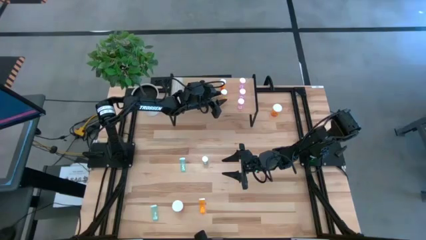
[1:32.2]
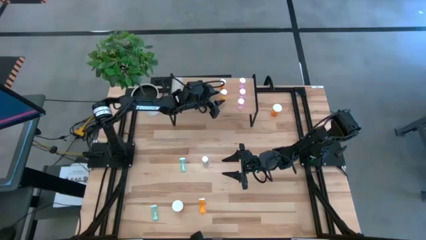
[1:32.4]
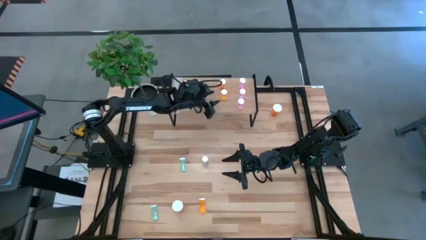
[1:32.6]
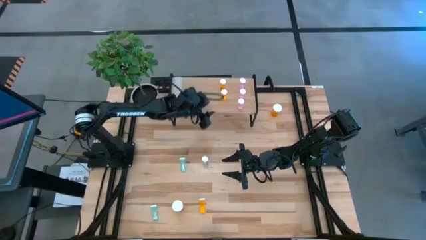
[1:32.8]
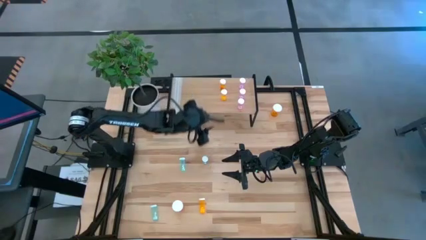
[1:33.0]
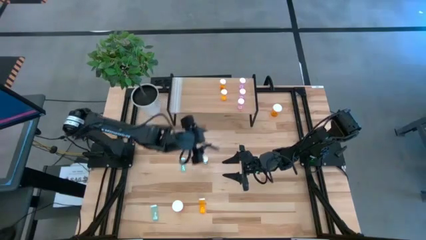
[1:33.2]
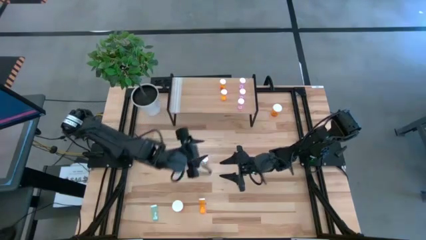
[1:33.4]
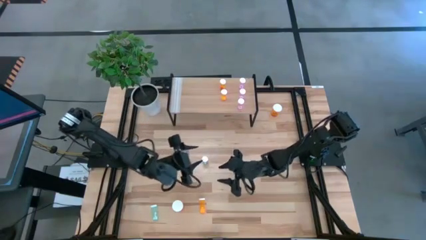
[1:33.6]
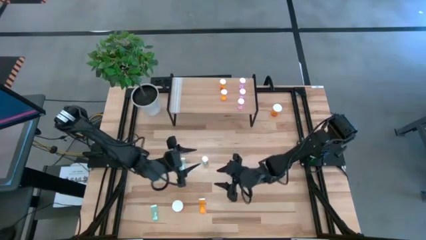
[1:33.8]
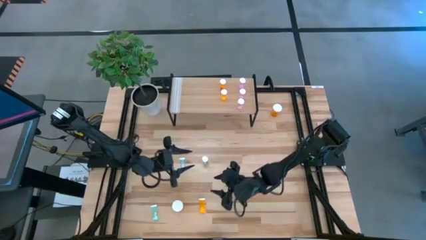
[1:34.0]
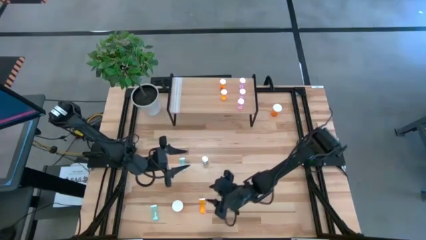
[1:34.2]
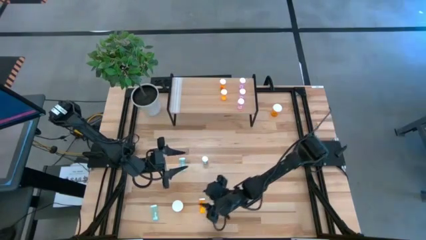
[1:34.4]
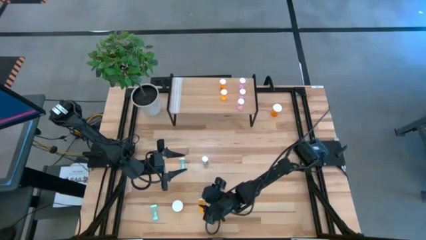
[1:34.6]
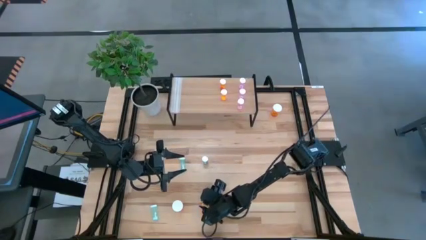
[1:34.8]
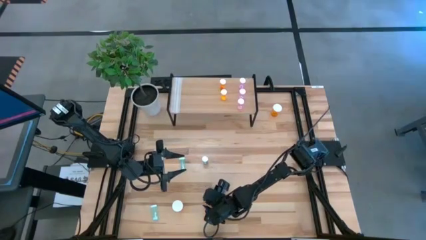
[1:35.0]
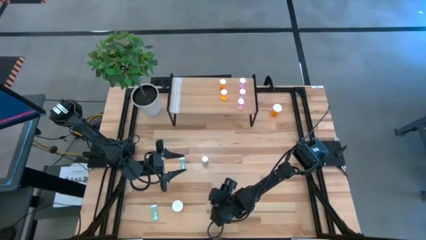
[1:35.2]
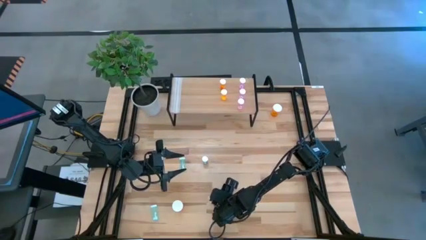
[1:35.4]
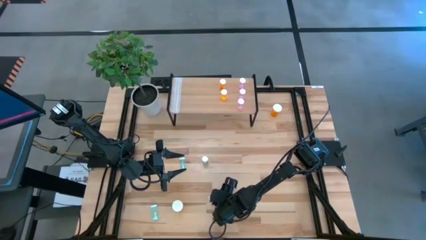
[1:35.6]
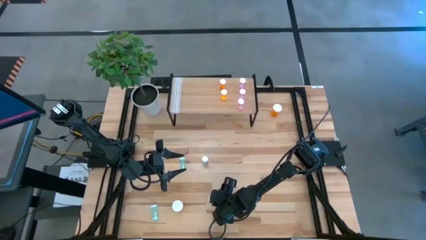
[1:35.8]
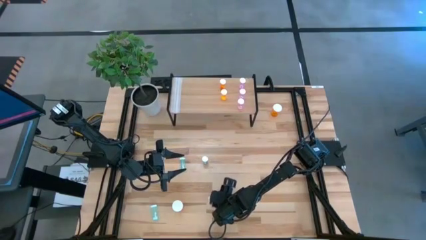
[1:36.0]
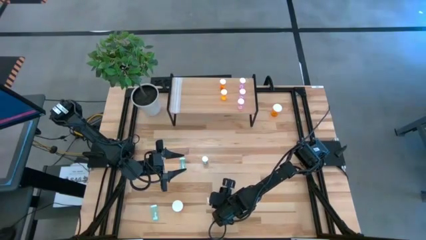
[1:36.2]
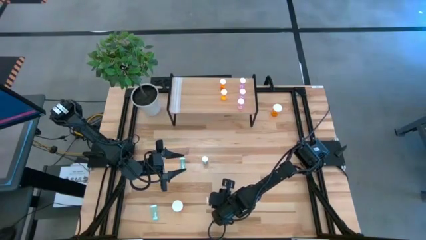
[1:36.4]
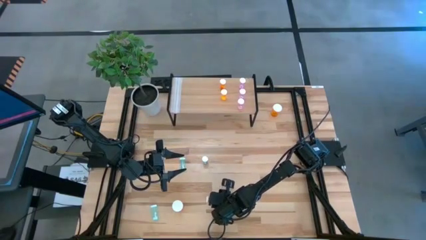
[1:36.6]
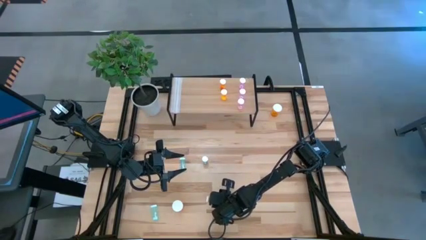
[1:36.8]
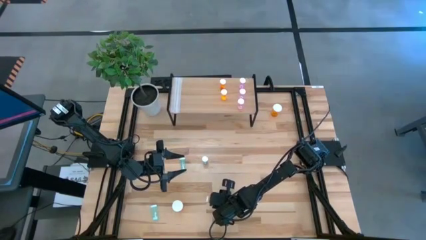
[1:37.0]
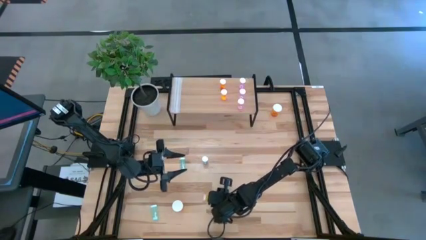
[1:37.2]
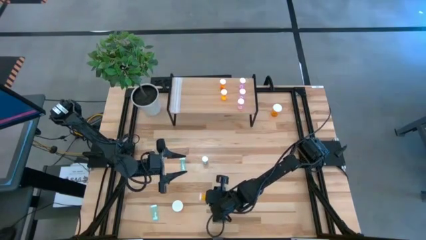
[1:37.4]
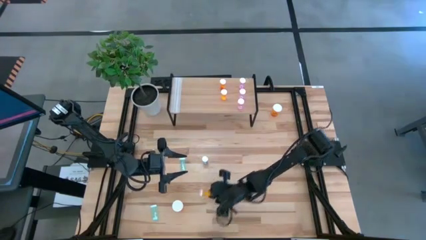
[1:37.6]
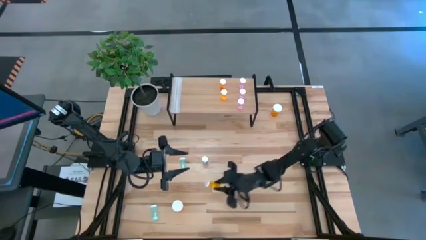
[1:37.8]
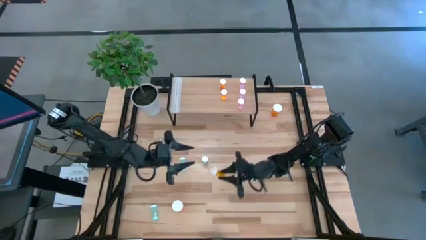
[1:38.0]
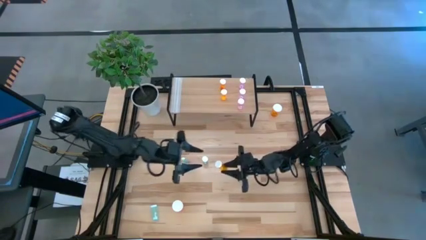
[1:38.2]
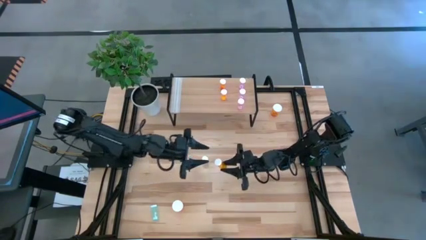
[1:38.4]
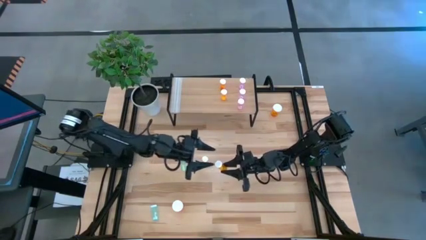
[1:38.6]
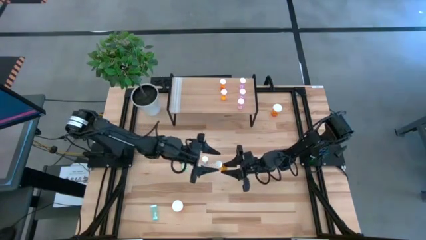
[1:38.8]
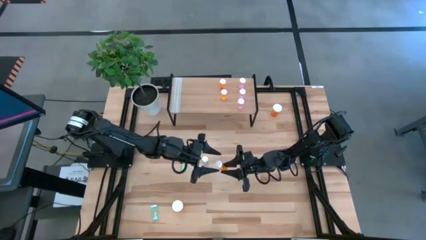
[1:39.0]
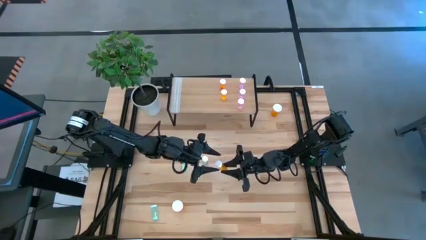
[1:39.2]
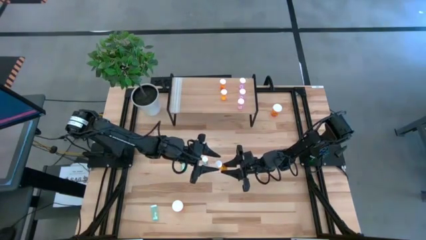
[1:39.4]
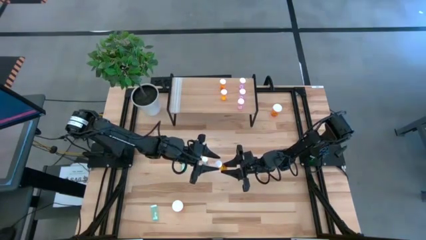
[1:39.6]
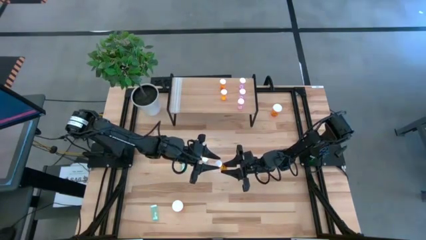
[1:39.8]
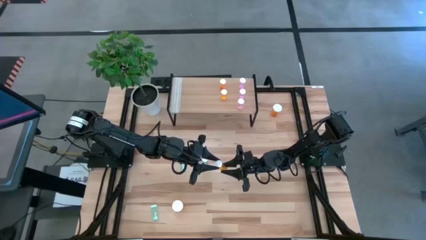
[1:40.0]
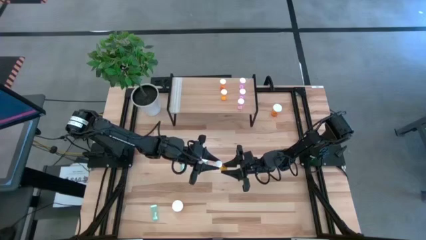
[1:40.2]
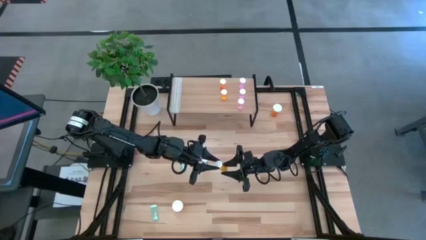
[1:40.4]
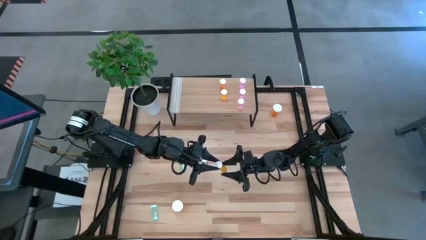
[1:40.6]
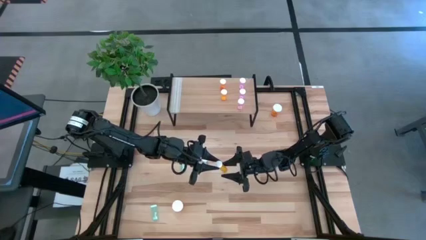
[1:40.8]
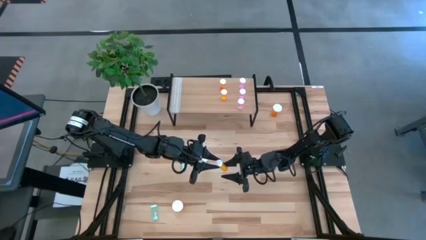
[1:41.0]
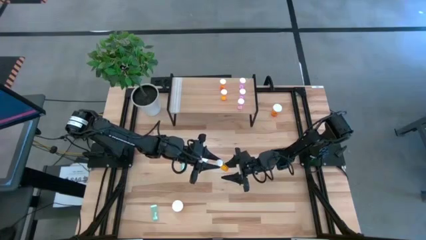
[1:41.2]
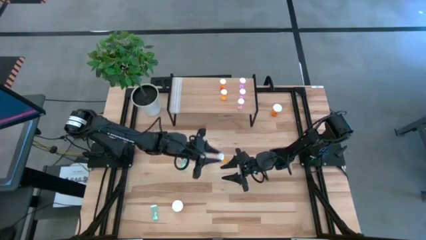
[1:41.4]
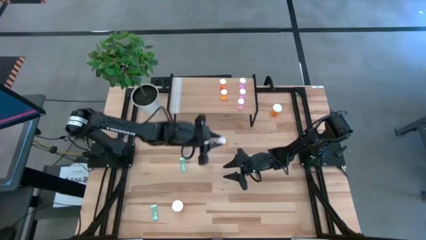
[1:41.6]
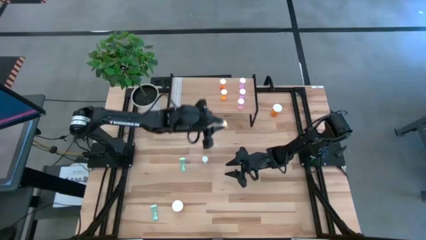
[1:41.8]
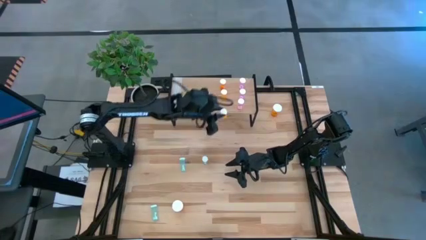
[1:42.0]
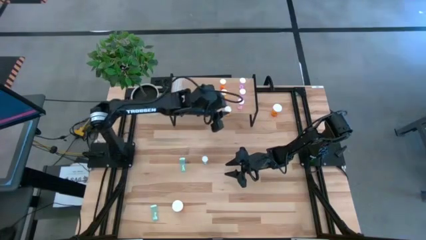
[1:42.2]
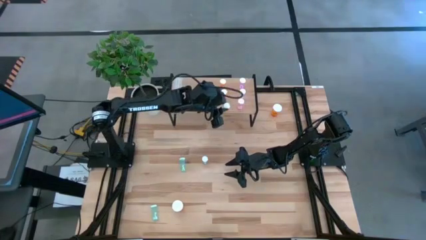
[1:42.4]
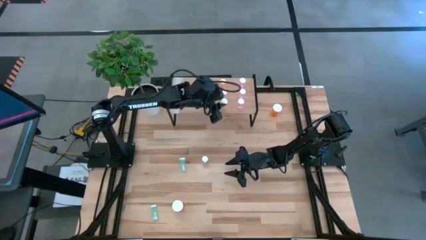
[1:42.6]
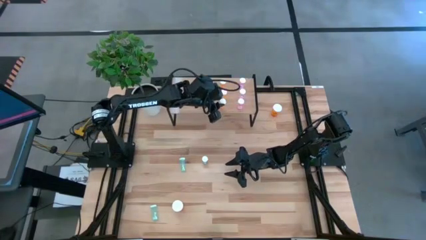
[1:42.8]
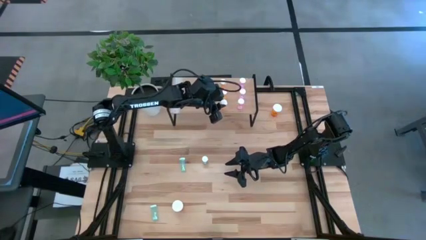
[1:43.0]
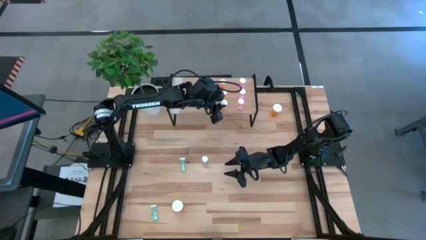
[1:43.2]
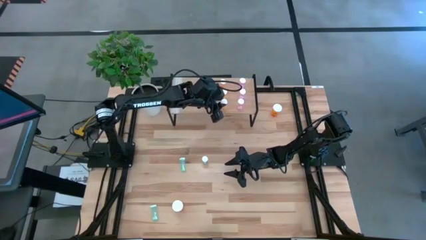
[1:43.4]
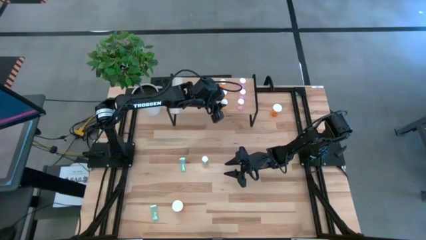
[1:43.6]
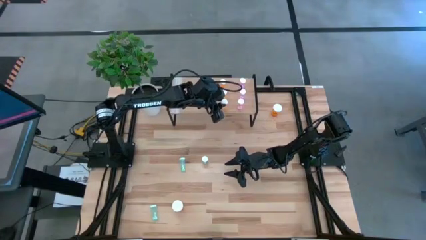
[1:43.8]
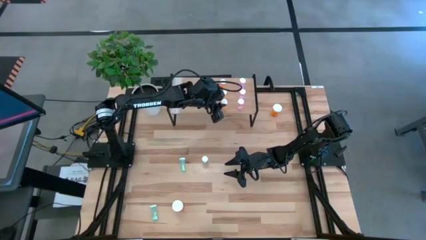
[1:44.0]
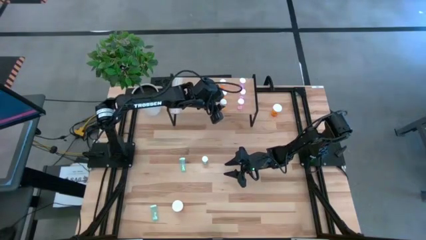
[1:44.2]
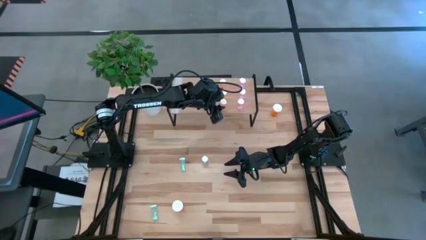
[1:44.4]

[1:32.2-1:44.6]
Task: Pick and place medicine bottles onto shelf by color
Put the orange pill bottle on the shelf aligned with the other orange pill bottles

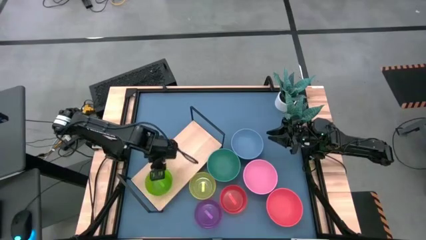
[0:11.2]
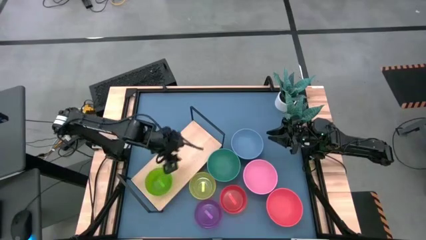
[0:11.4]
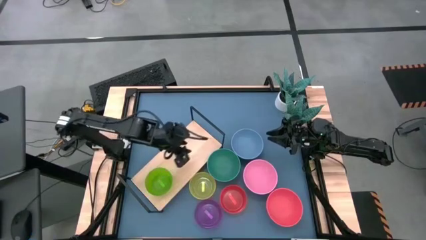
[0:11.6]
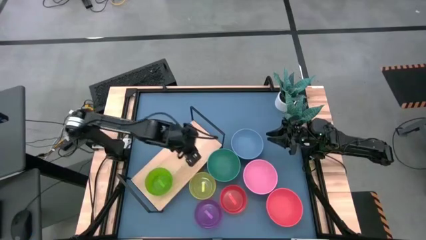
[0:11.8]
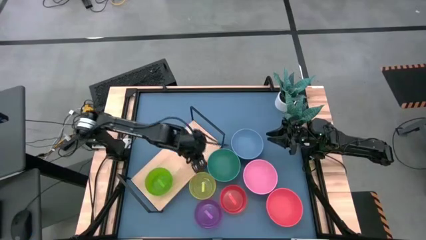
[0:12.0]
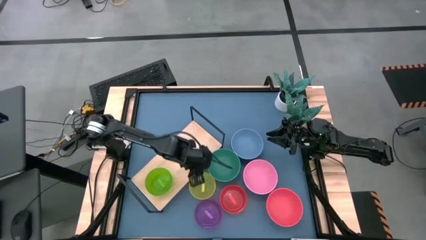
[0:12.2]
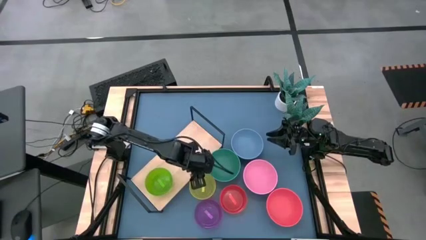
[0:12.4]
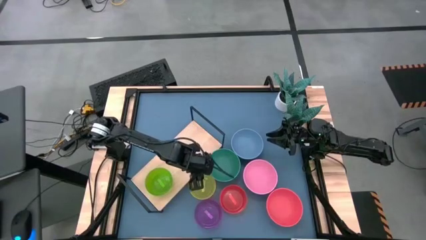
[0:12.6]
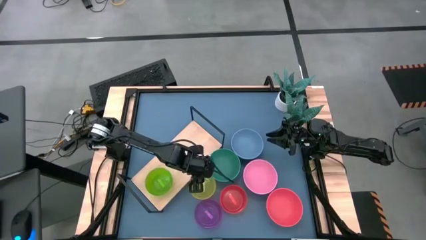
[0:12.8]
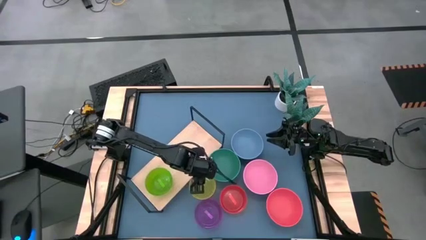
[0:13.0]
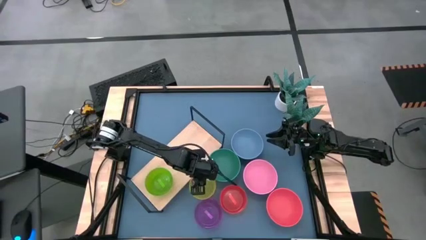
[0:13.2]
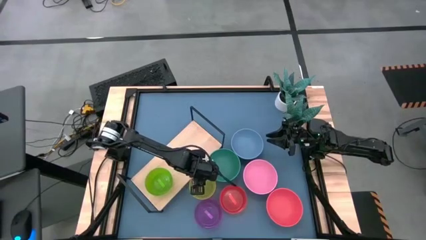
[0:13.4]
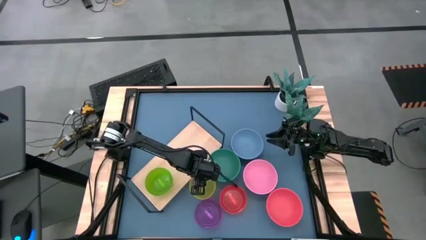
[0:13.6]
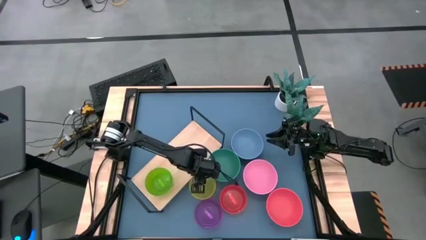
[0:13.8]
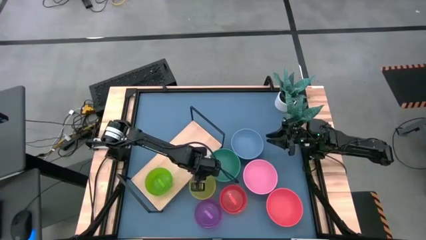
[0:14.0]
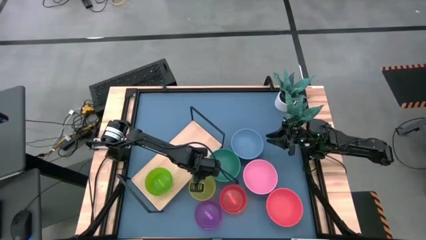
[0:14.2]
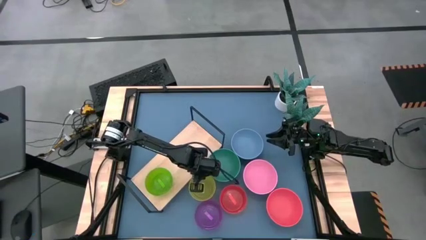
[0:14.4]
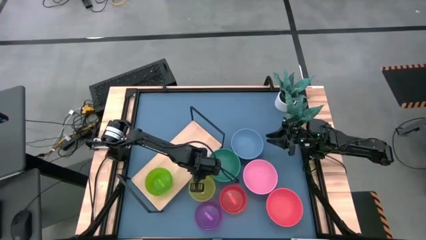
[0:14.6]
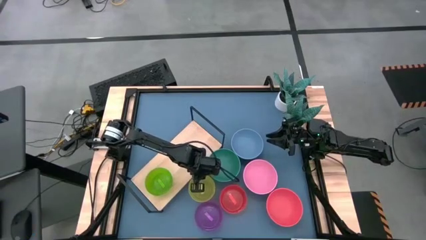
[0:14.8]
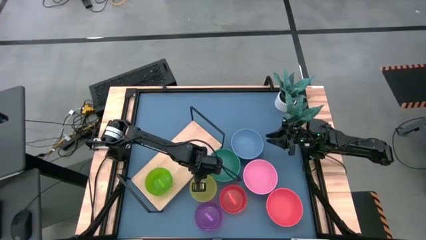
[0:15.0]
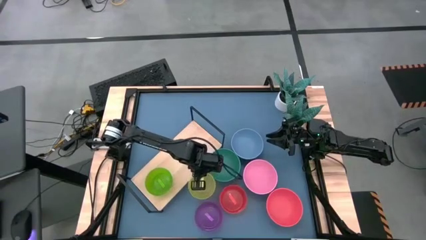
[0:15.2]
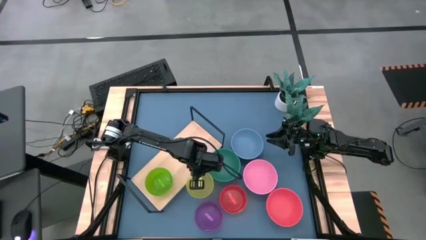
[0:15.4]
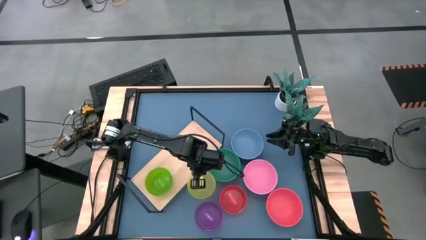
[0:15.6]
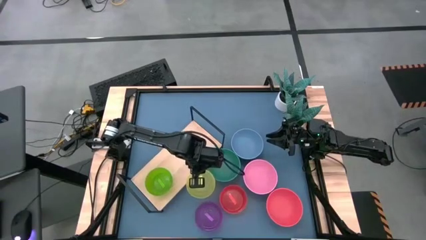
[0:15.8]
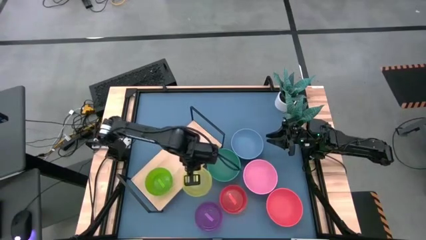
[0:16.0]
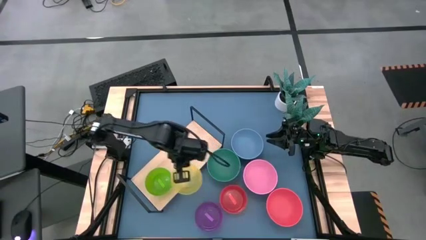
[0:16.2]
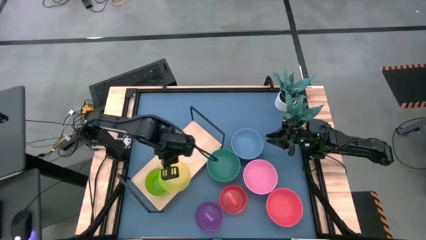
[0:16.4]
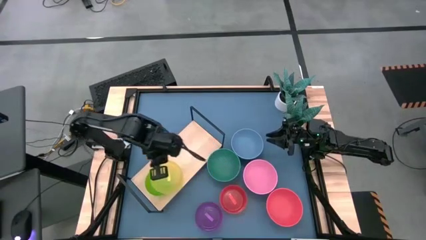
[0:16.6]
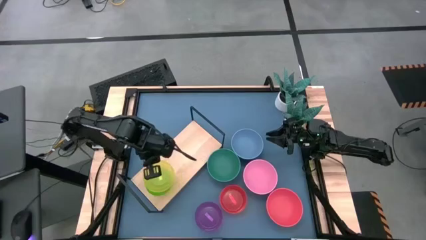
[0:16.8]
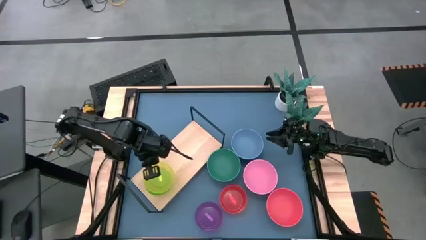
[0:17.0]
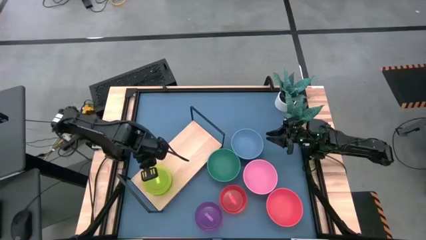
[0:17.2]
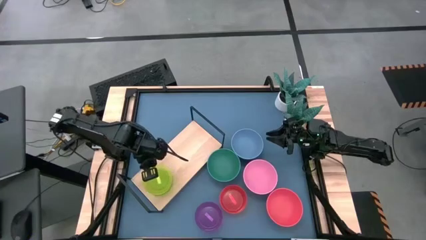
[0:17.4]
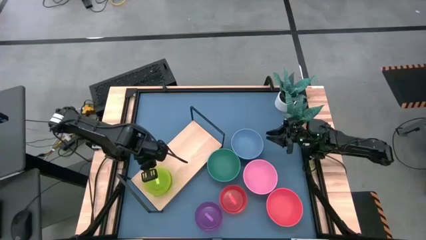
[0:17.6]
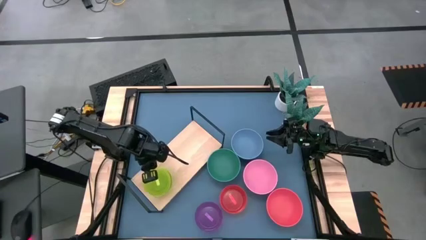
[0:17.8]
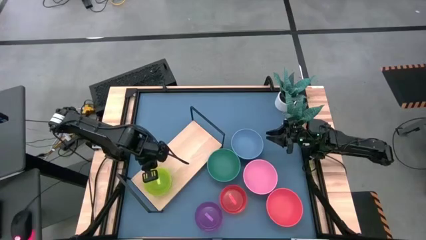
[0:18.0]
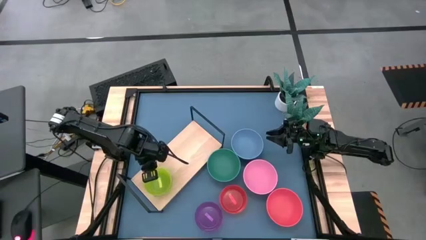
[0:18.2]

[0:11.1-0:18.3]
Task: Place and stack bowls onto a shelf
Stack the yellow bowl on top of the small green bowl on the shelf
